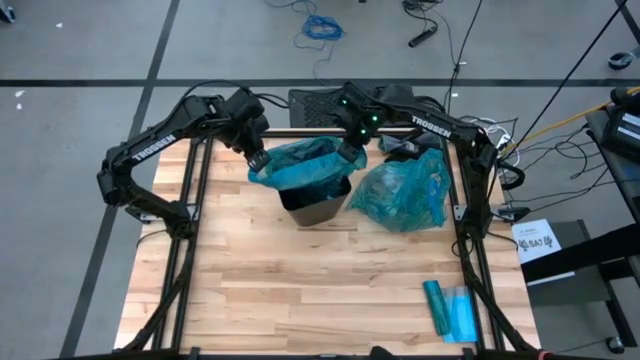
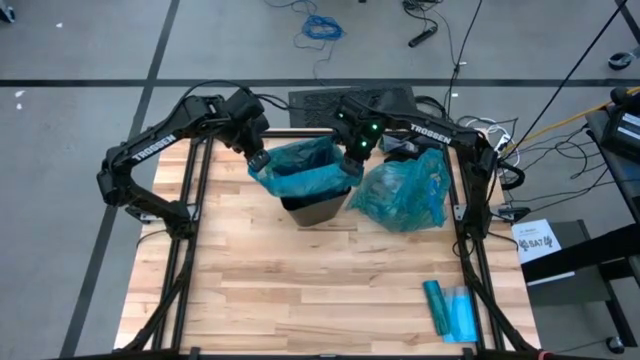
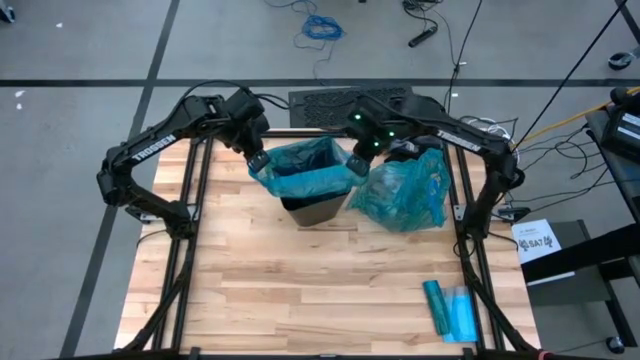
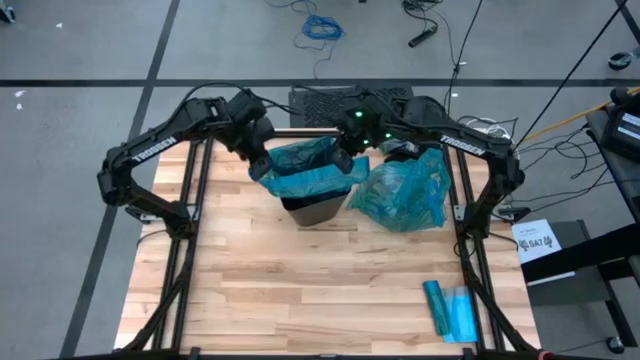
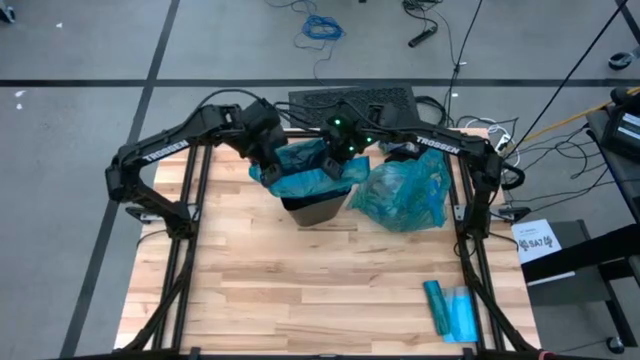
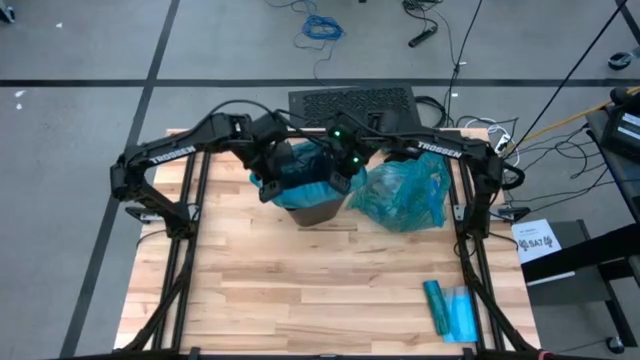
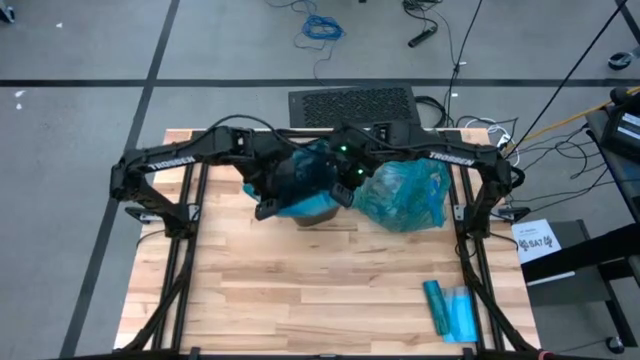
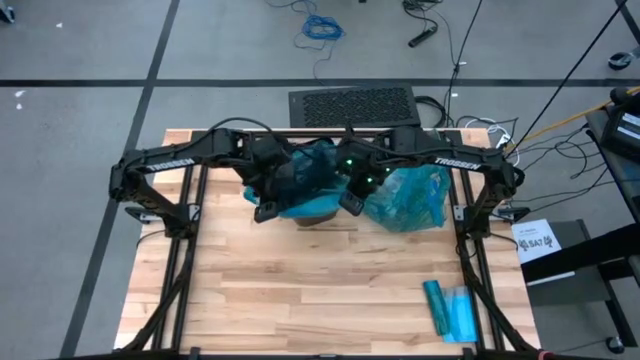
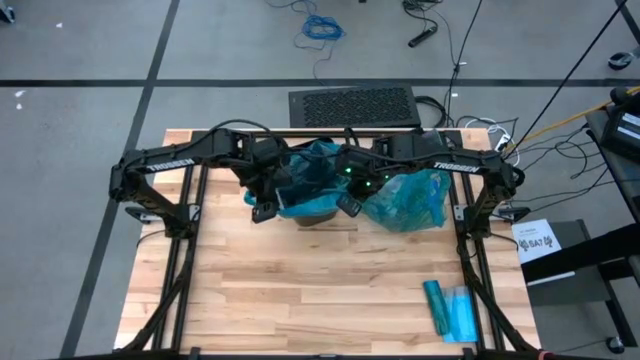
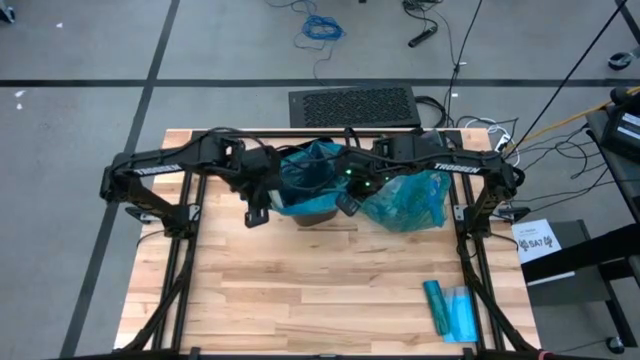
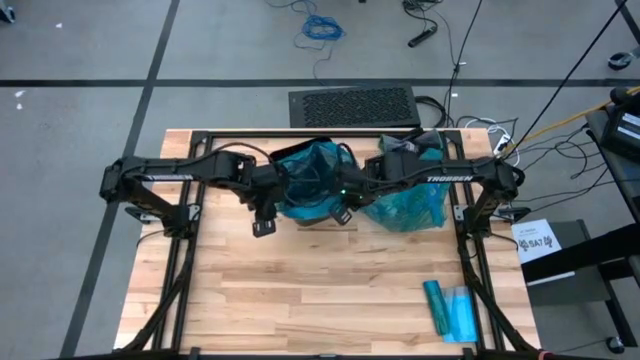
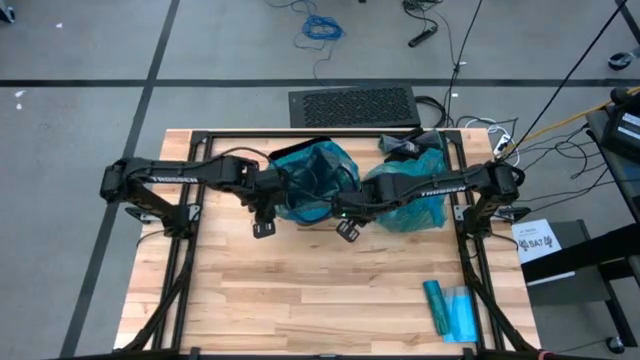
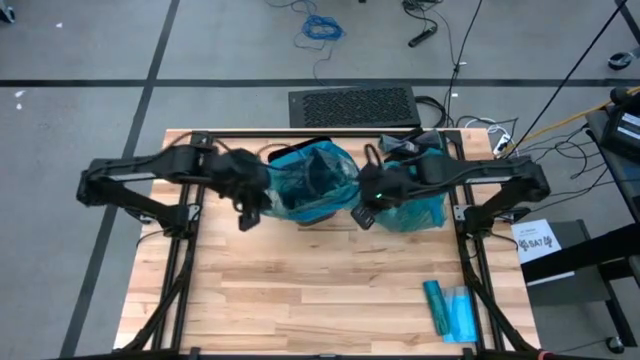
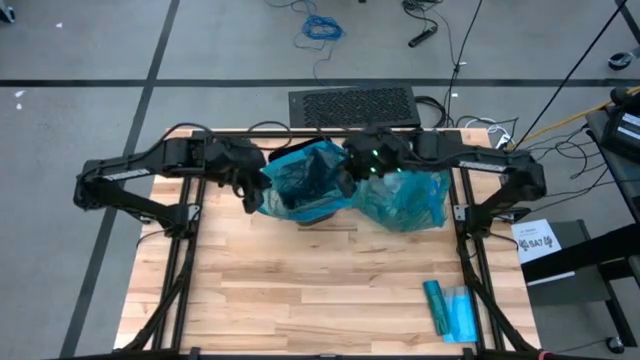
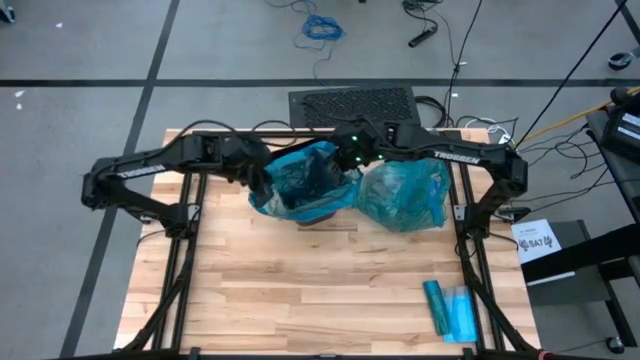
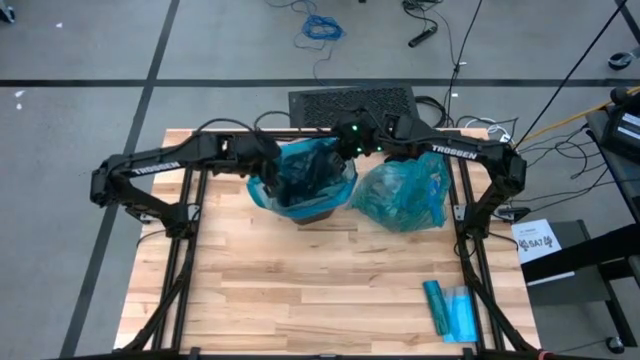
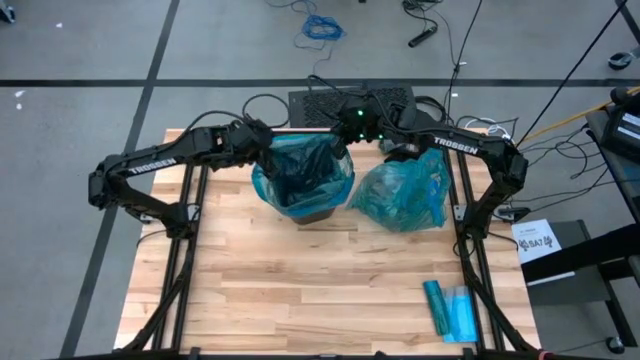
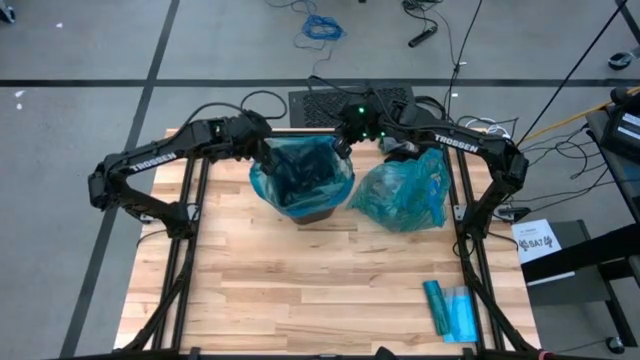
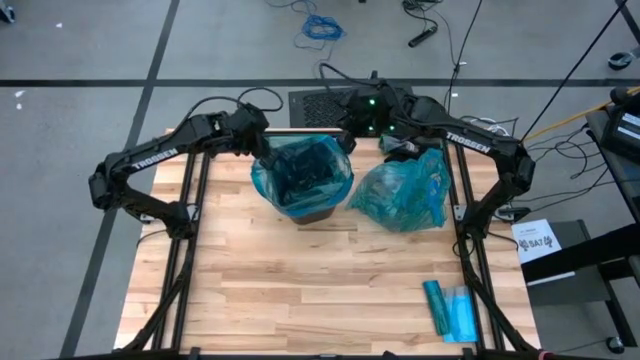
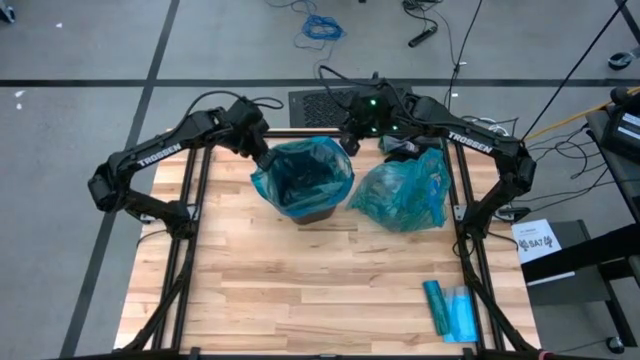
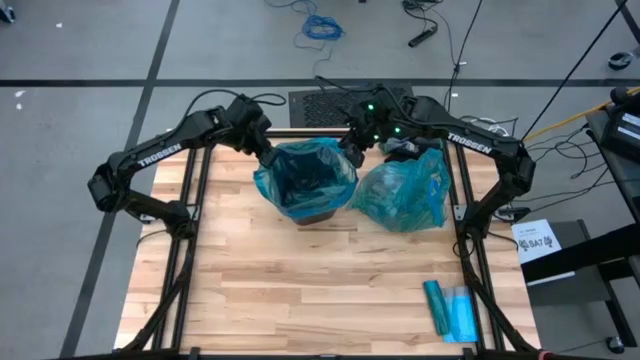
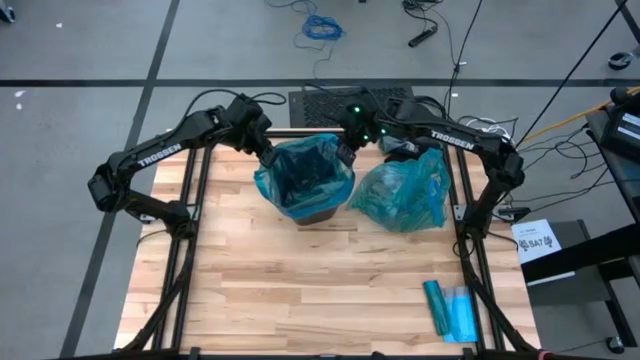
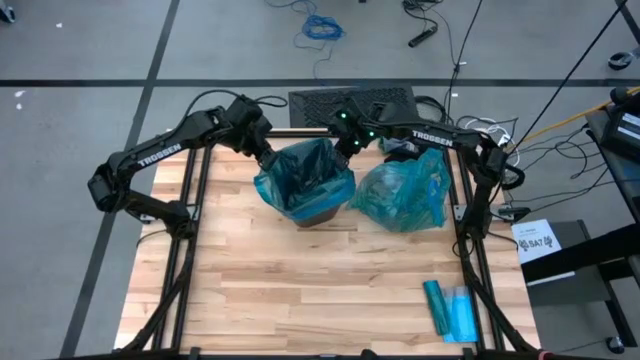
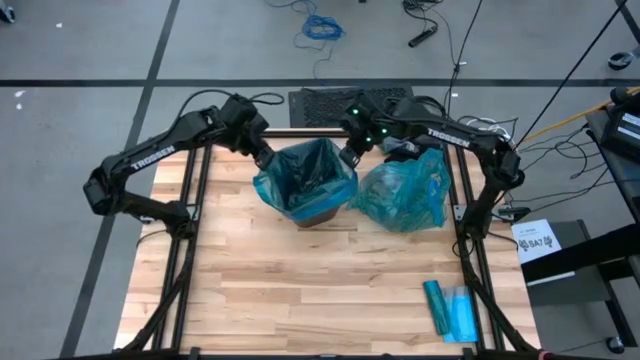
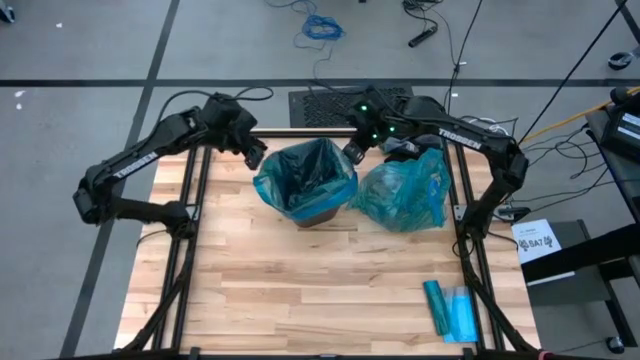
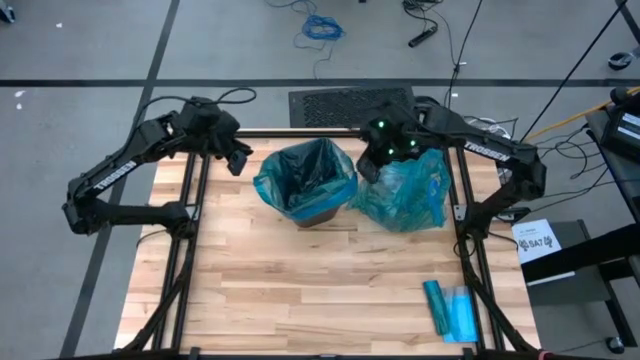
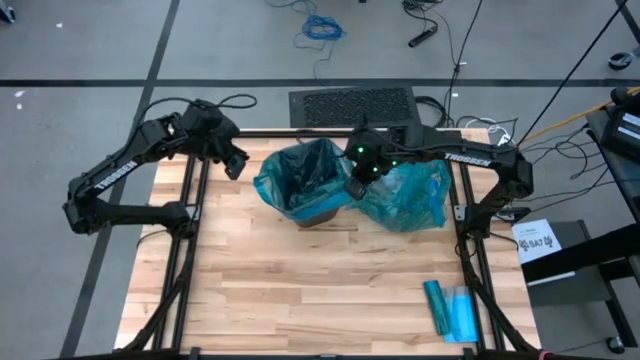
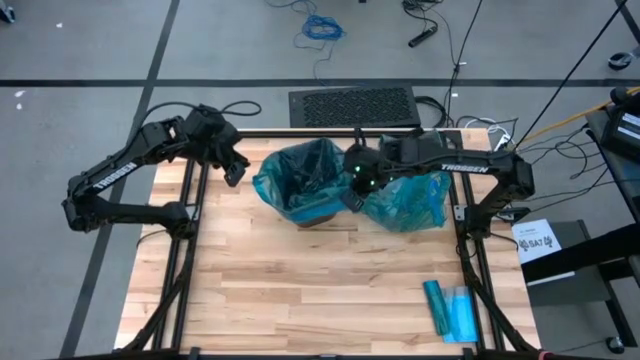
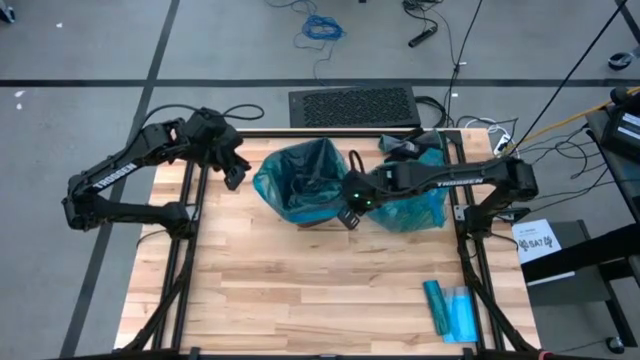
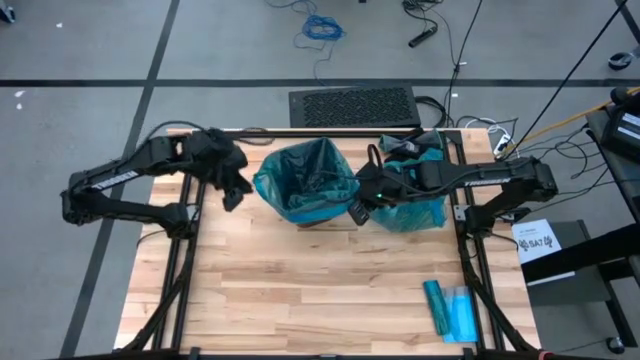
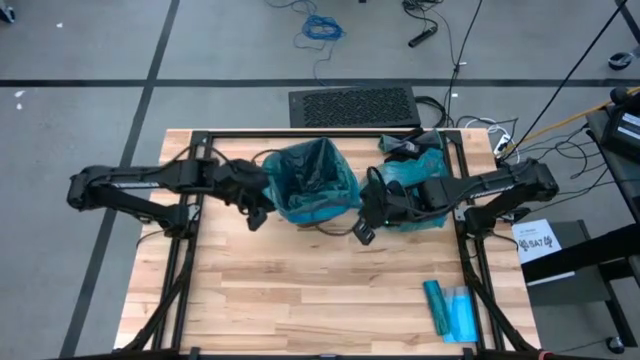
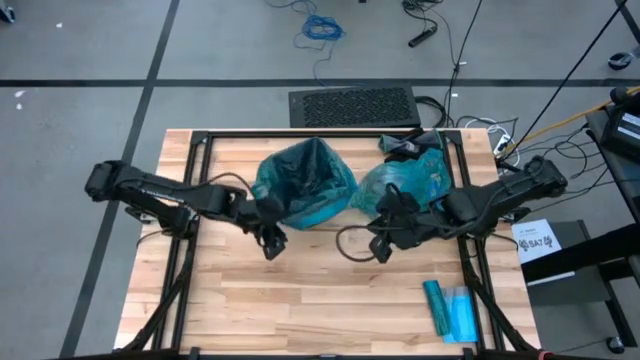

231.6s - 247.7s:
Task: place trash/remove bag and relplace
Insert the new trash bag into the trash bin

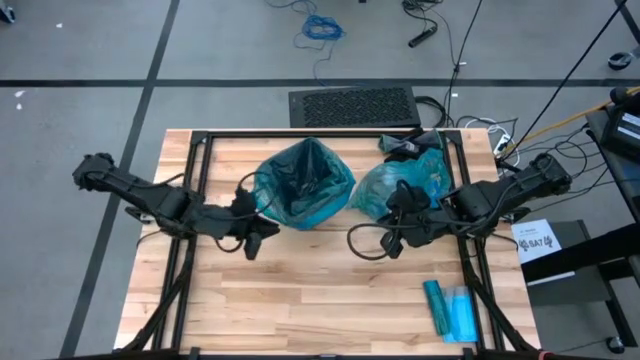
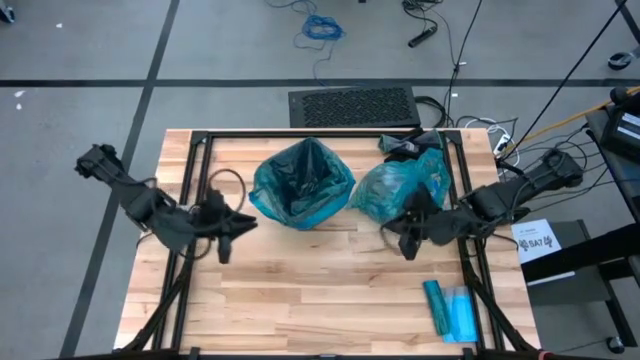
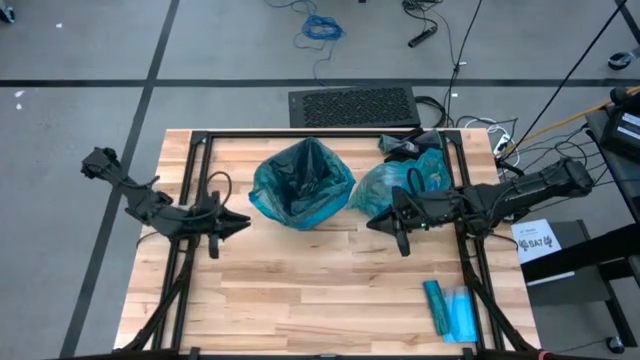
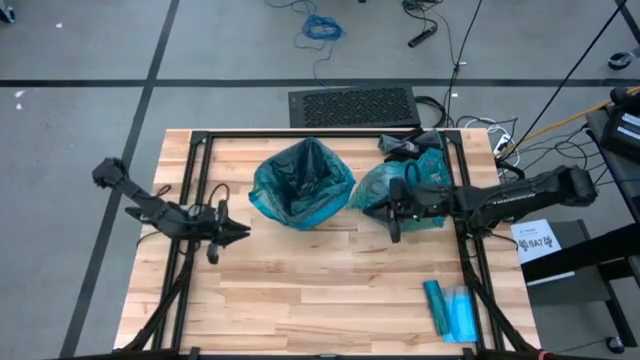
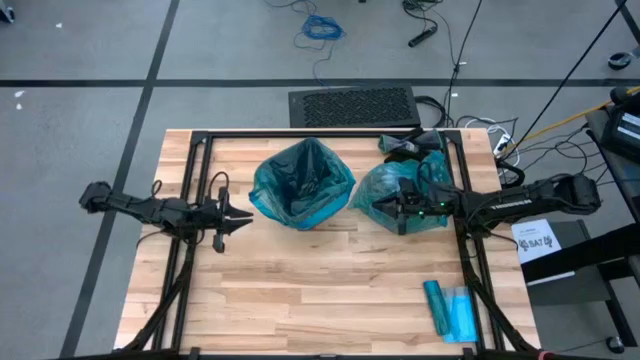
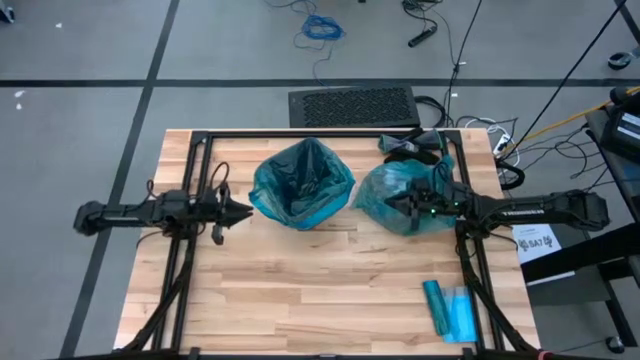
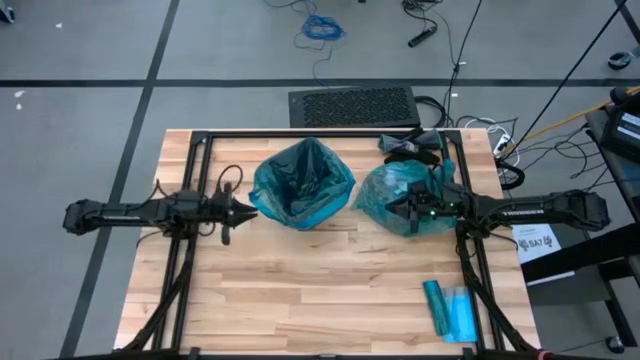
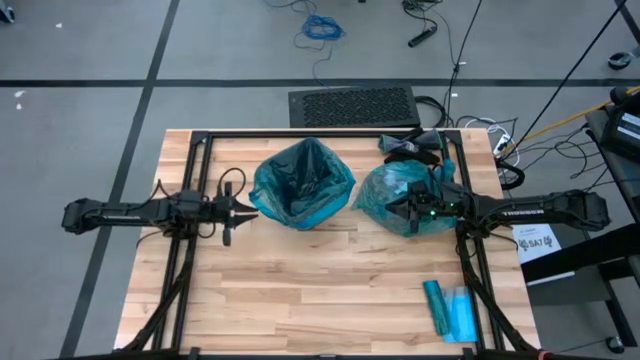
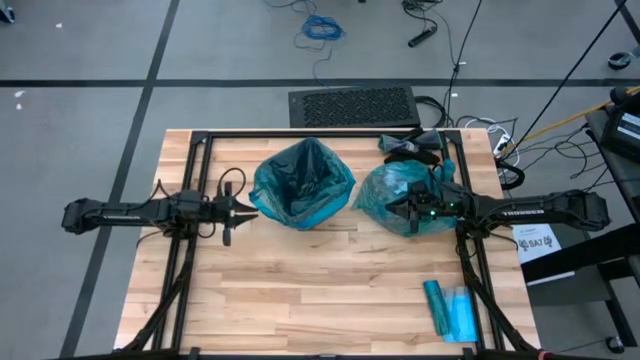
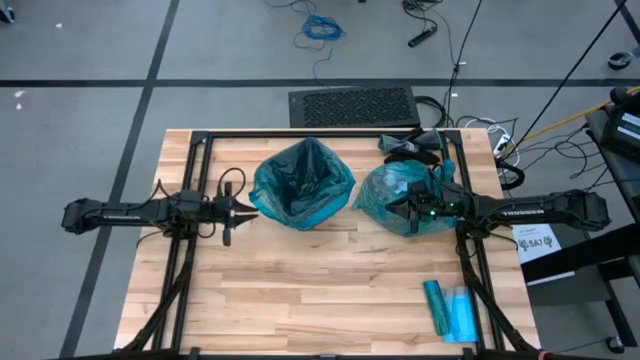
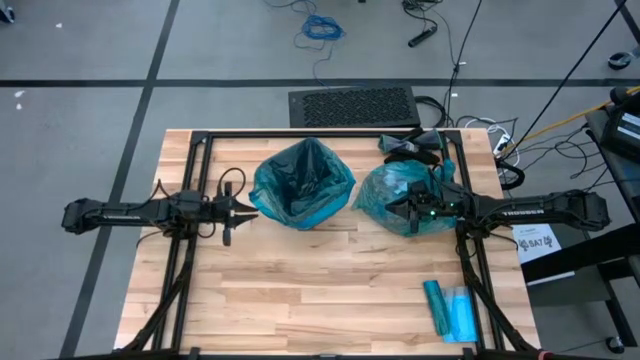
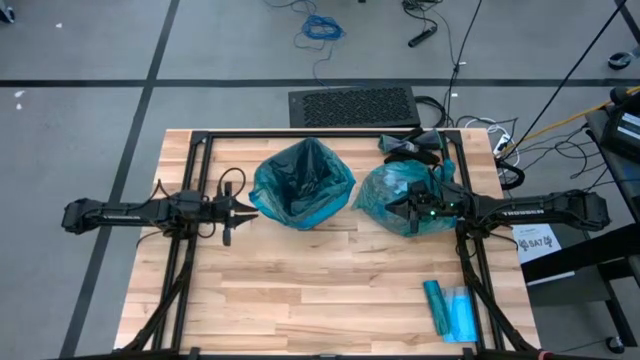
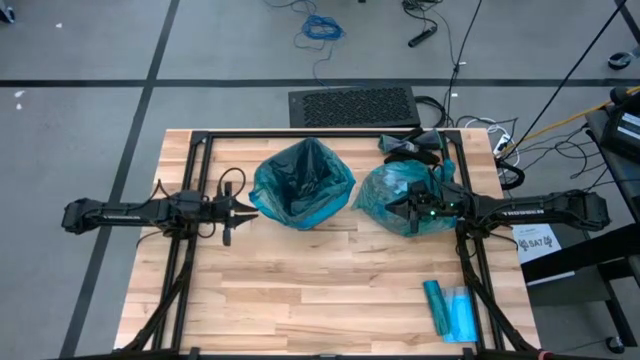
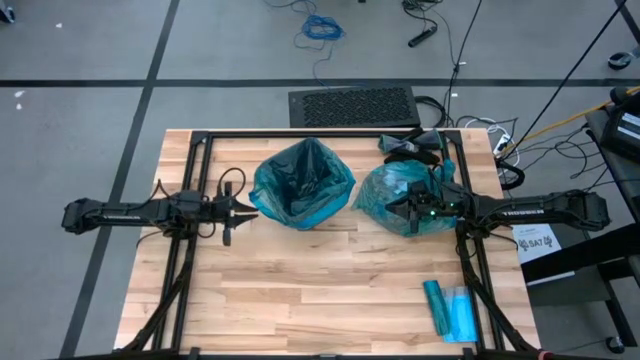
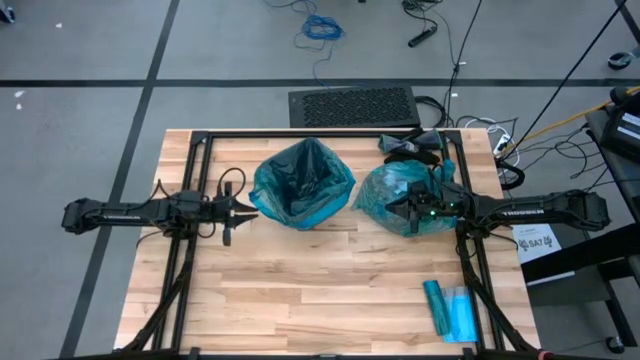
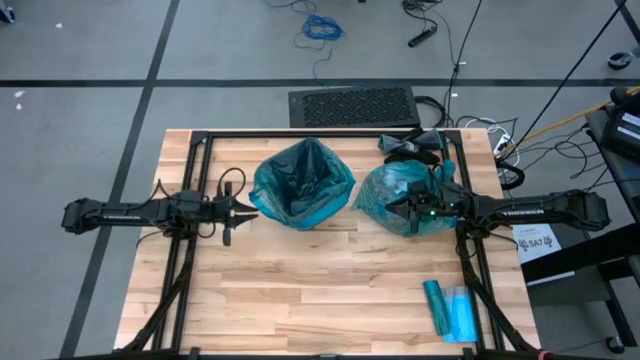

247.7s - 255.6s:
Return to Home Position
